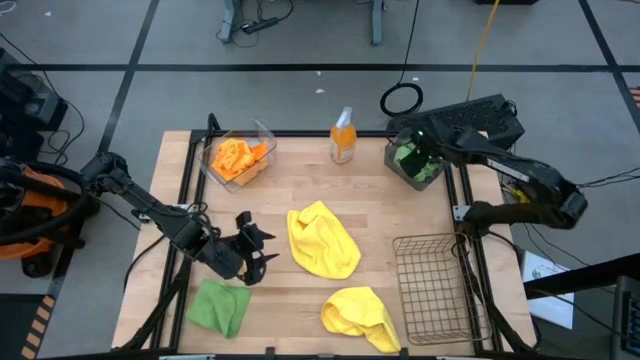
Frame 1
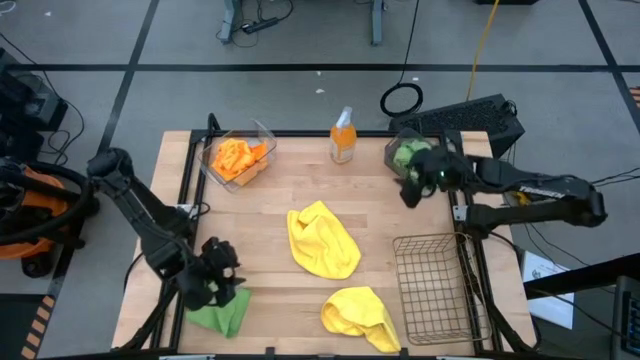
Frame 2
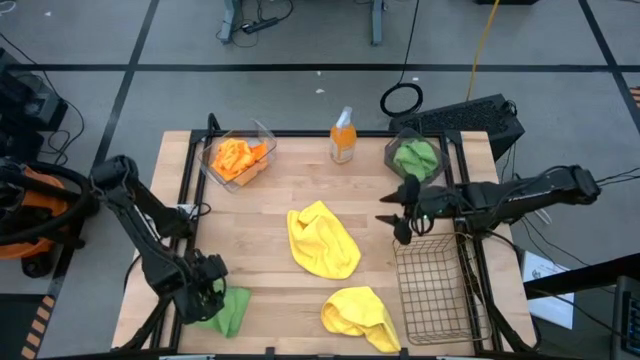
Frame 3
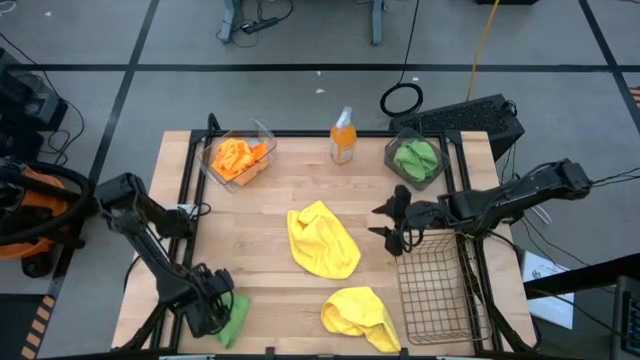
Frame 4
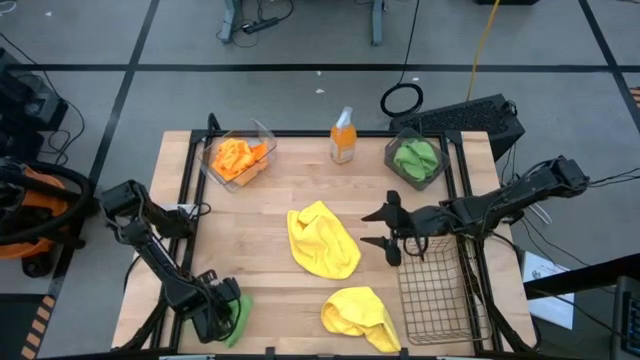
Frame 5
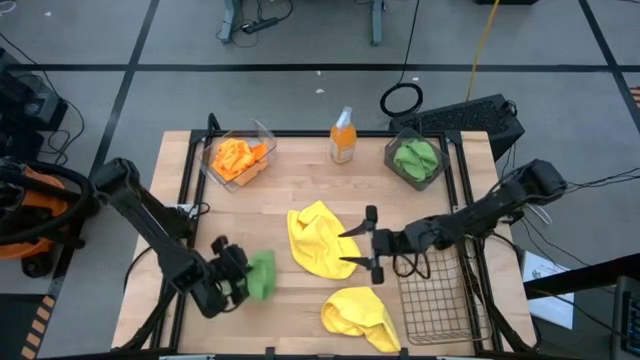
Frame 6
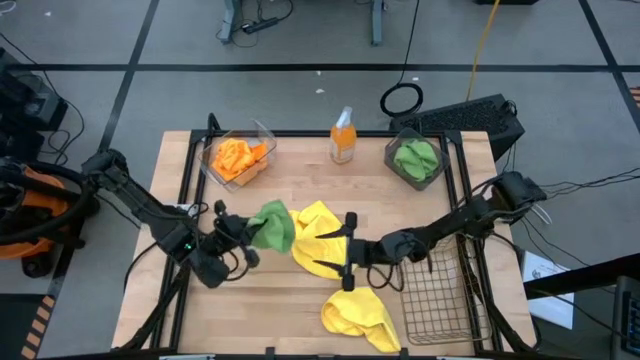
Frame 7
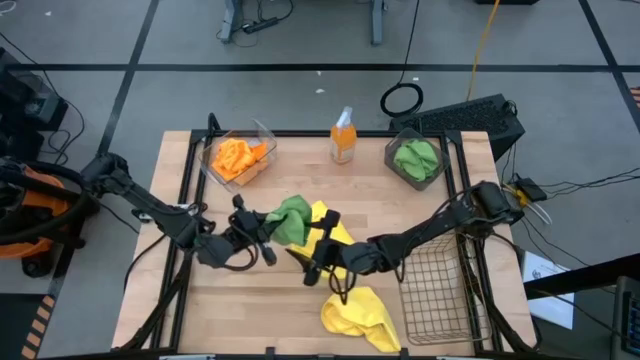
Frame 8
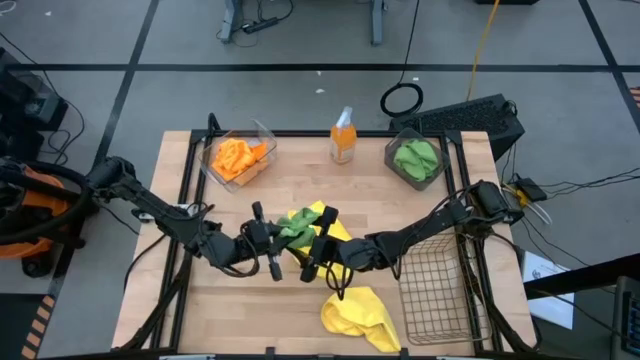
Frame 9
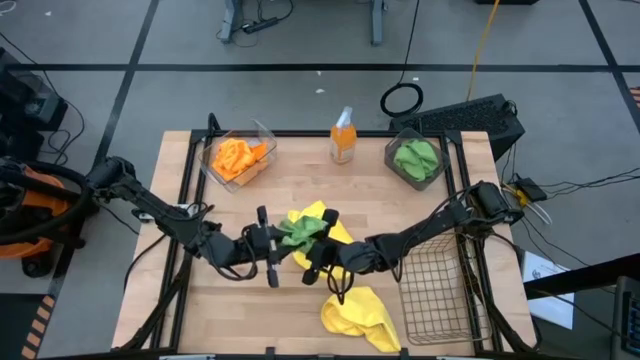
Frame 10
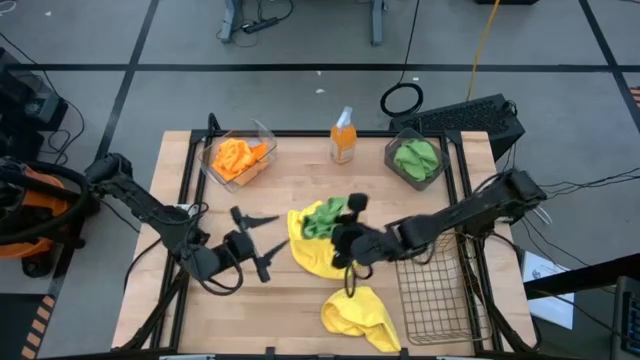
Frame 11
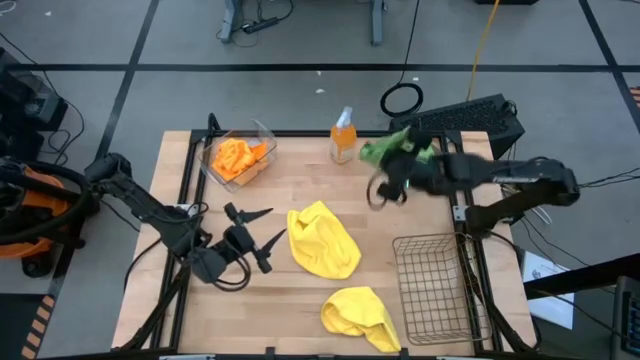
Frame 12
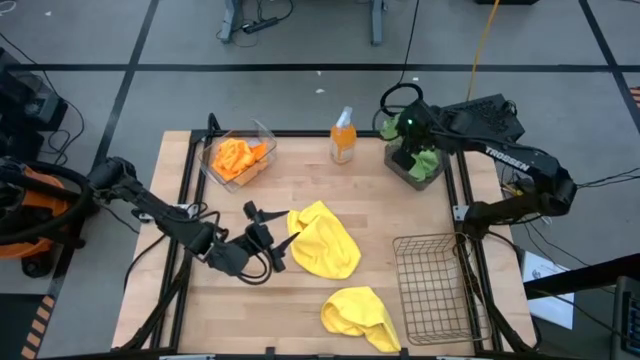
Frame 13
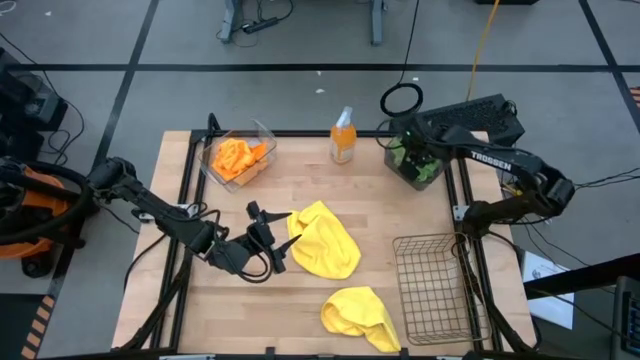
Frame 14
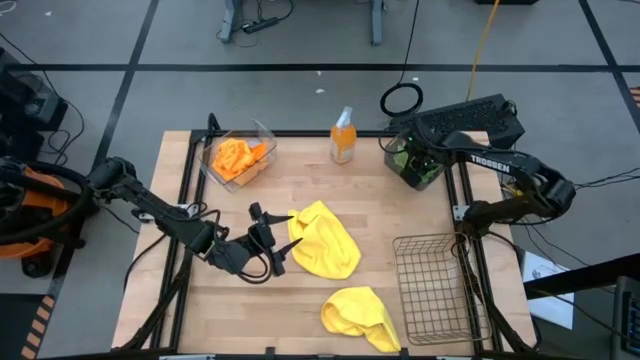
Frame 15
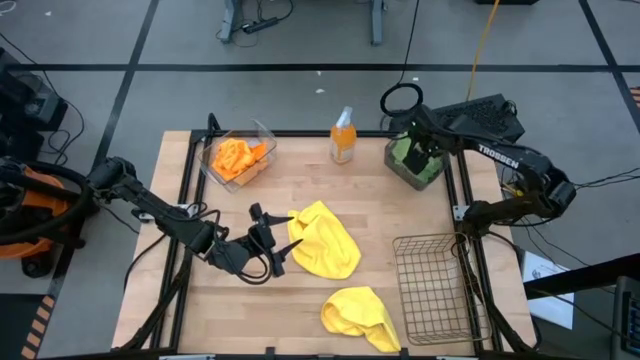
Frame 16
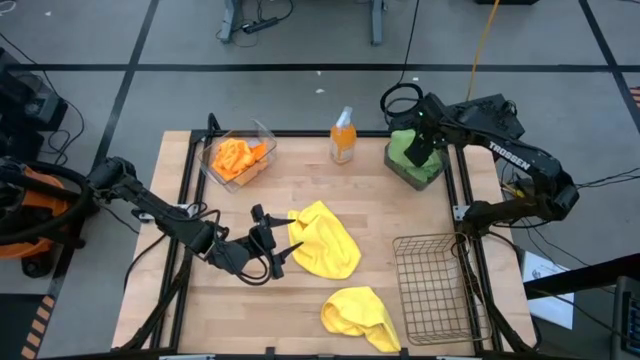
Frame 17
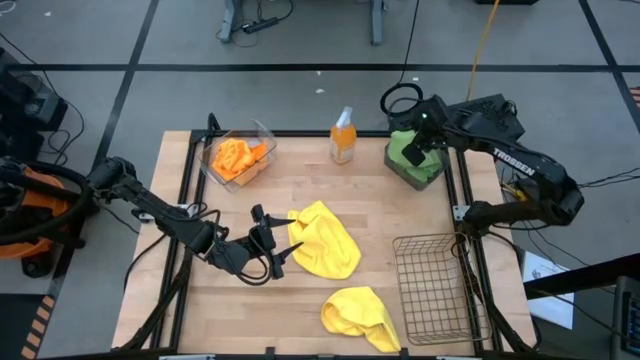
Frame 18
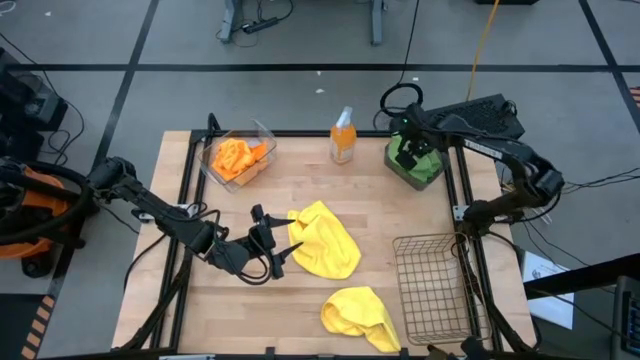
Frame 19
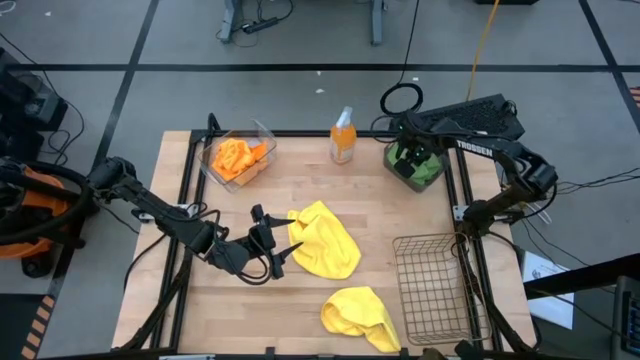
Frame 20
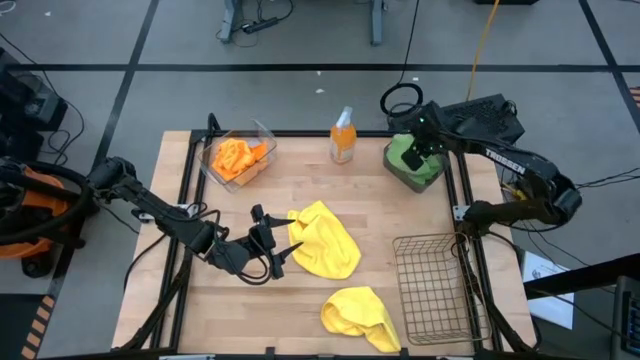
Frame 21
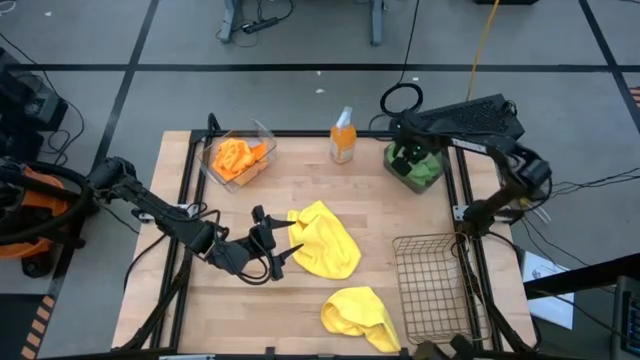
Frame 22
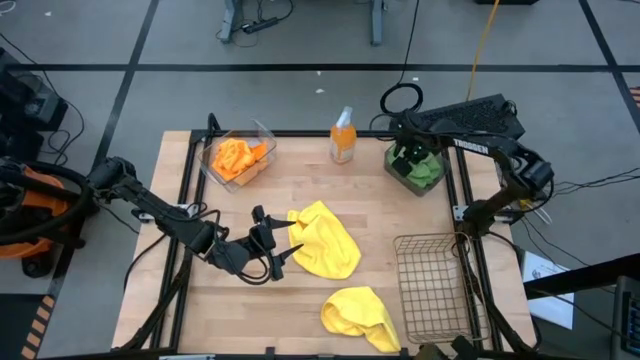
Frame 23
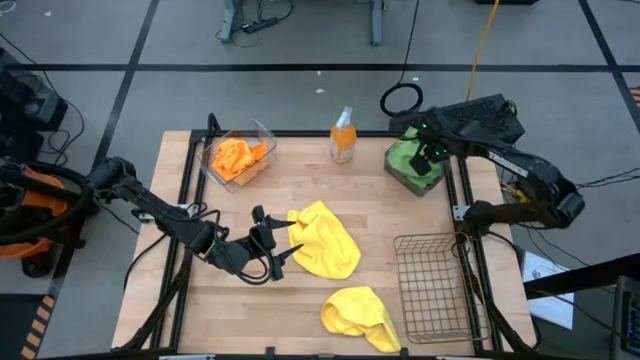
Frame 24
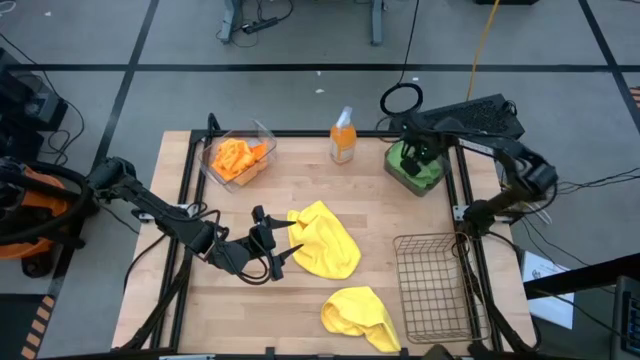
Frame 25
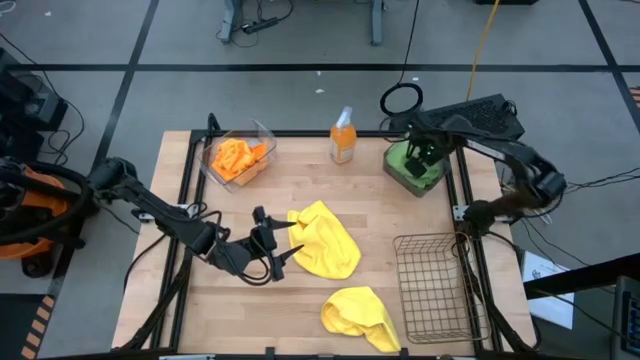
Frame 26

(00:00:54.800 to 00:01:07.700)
Task: Sort microfiber towel by color & place in baskets
Put the green microfiber cloth into the black bin
